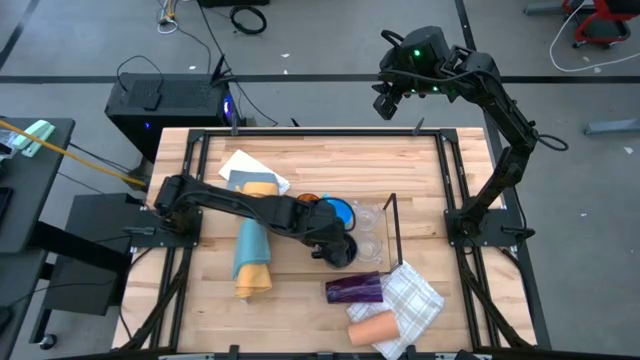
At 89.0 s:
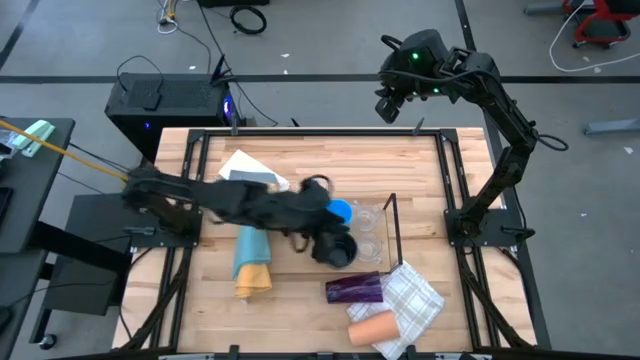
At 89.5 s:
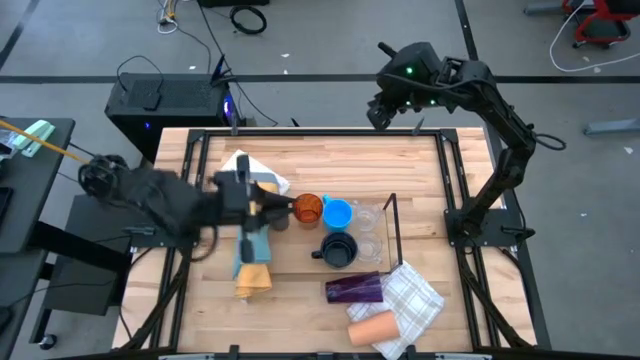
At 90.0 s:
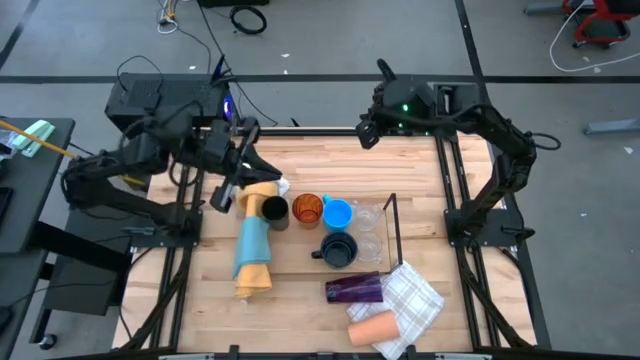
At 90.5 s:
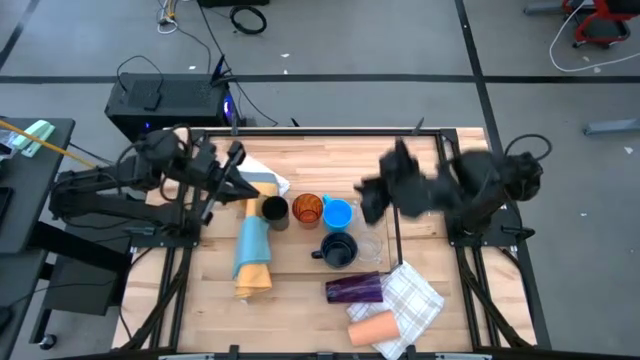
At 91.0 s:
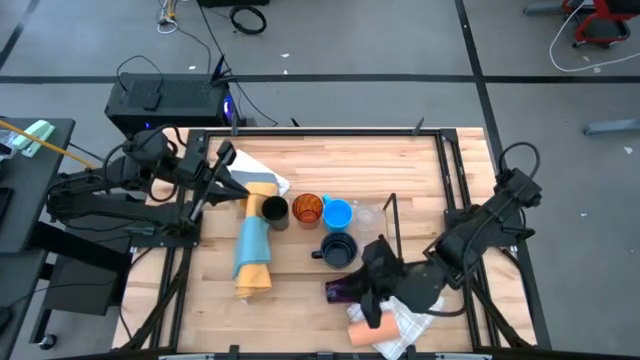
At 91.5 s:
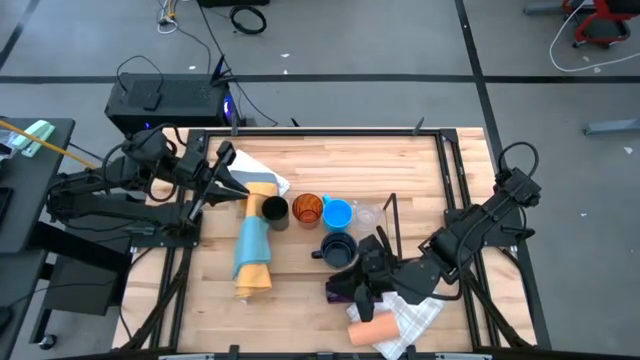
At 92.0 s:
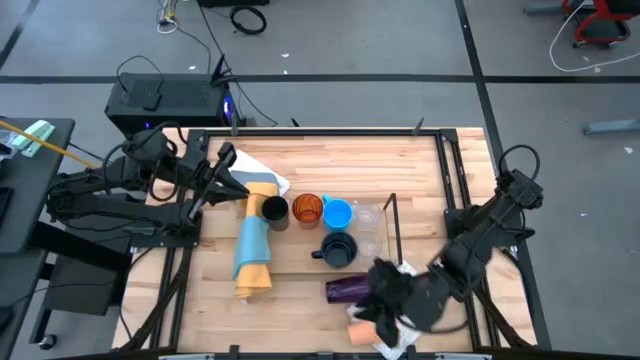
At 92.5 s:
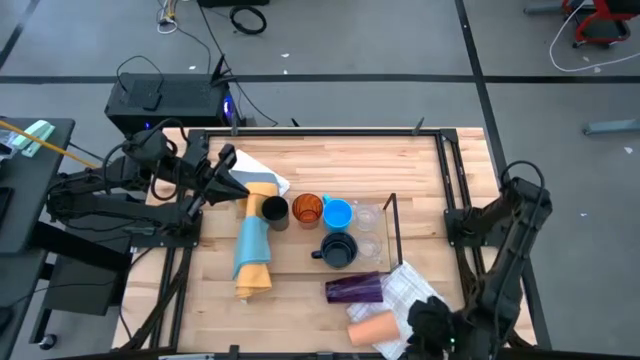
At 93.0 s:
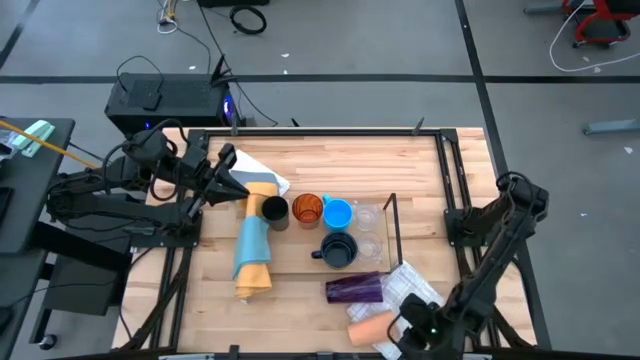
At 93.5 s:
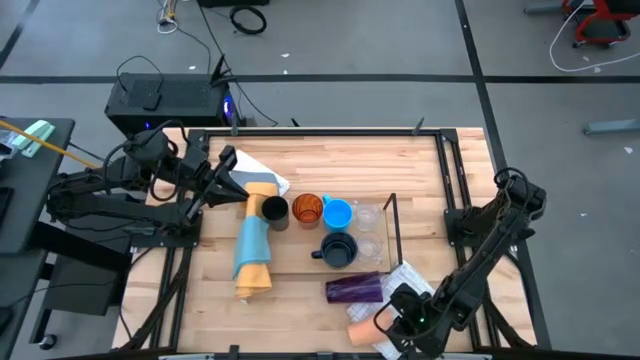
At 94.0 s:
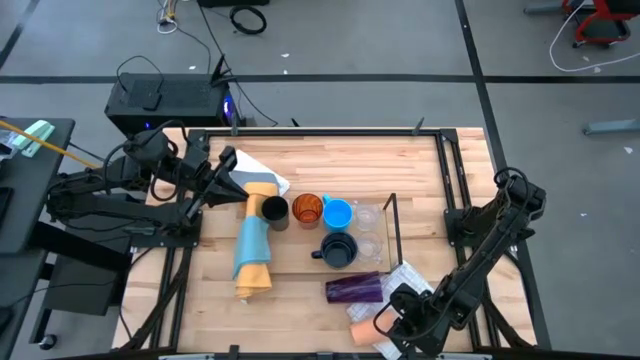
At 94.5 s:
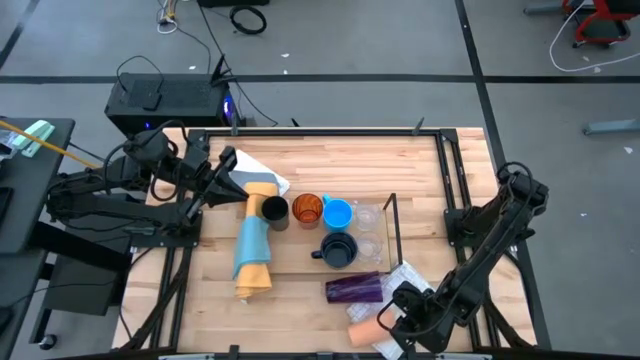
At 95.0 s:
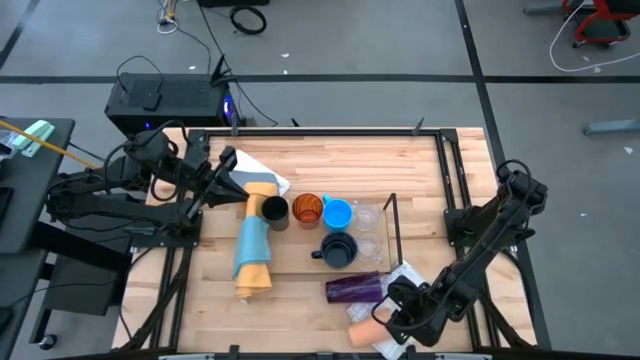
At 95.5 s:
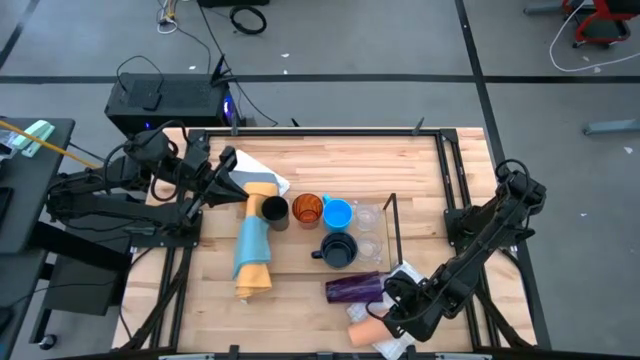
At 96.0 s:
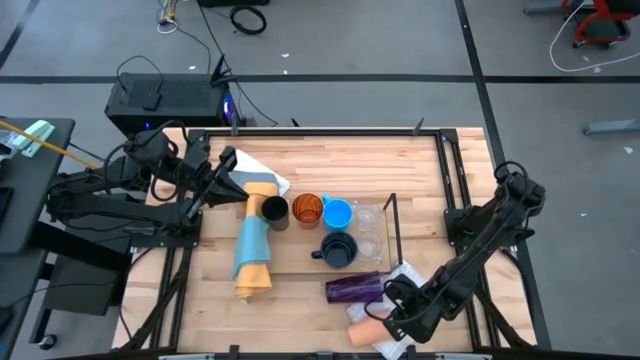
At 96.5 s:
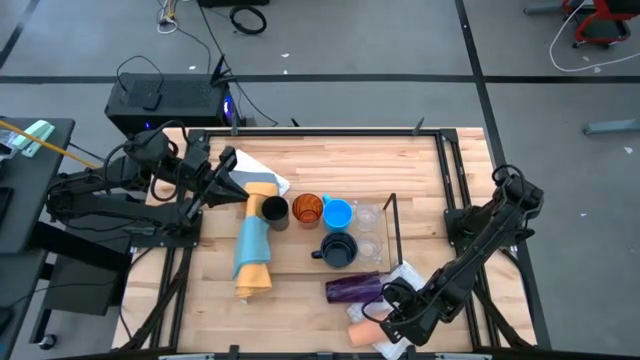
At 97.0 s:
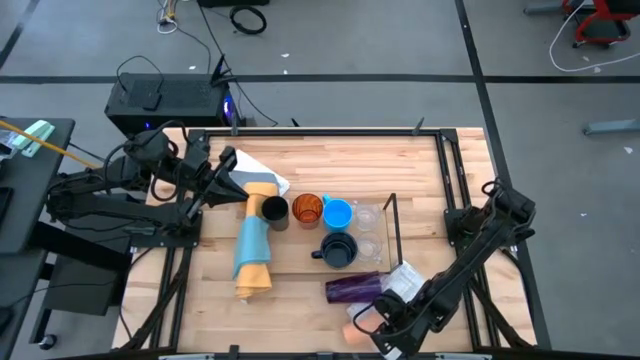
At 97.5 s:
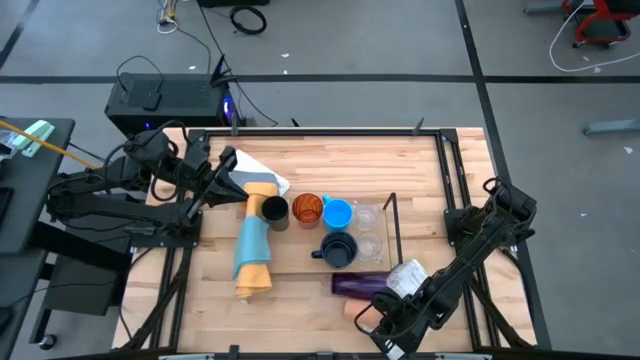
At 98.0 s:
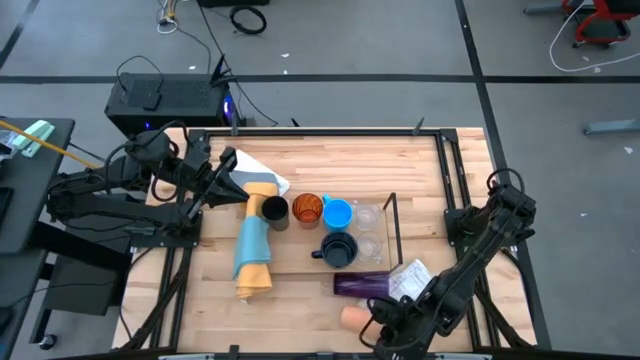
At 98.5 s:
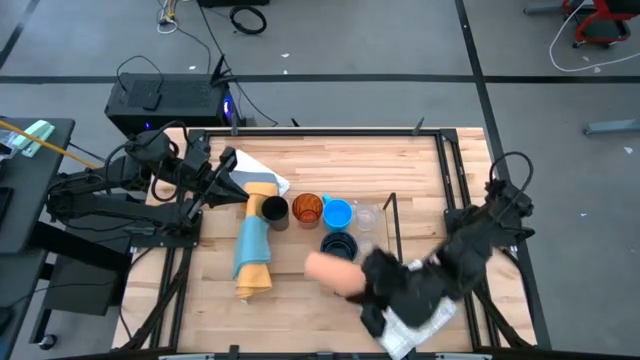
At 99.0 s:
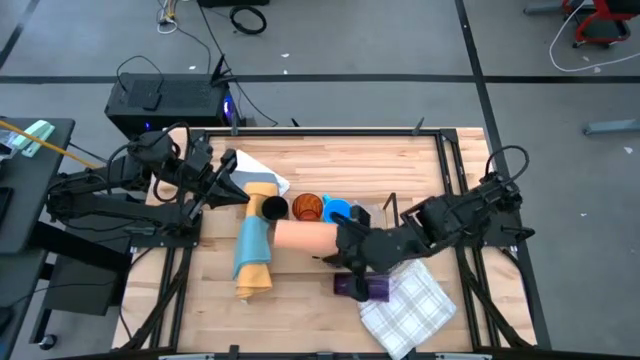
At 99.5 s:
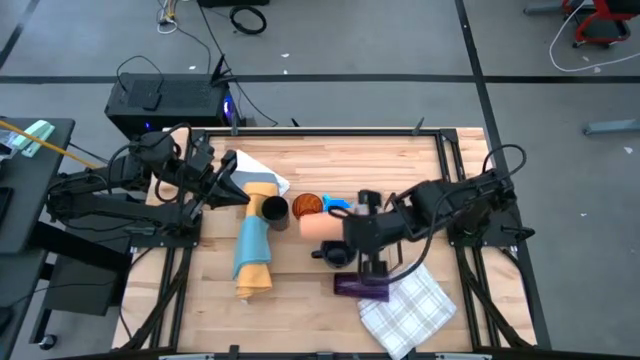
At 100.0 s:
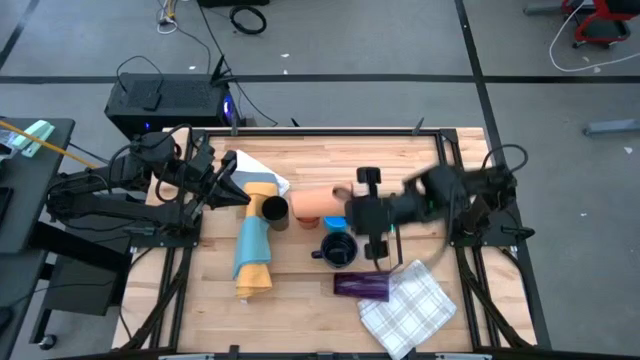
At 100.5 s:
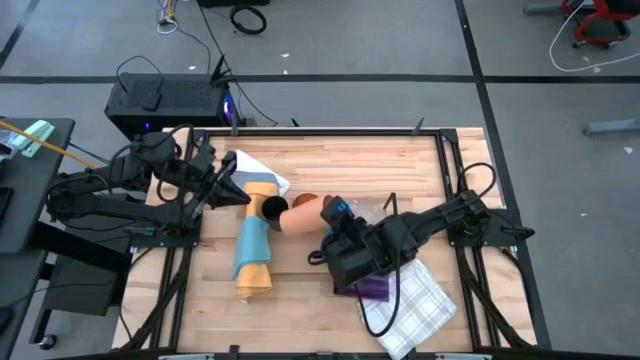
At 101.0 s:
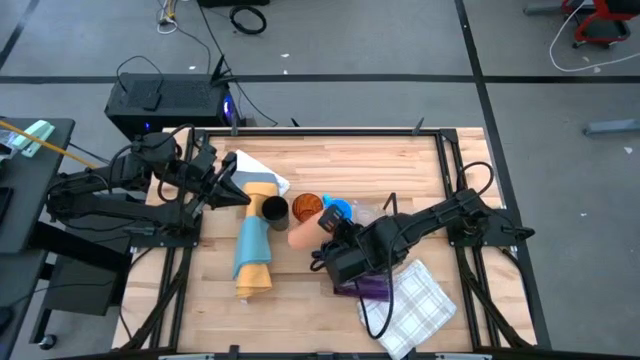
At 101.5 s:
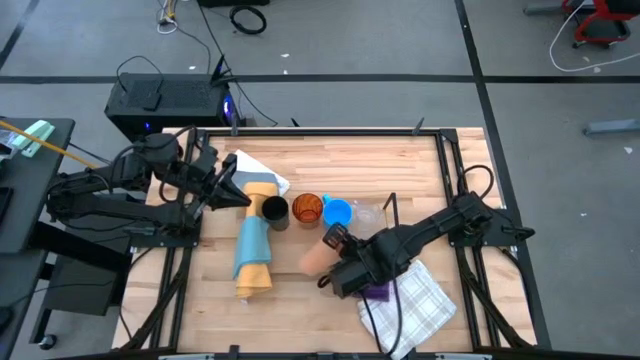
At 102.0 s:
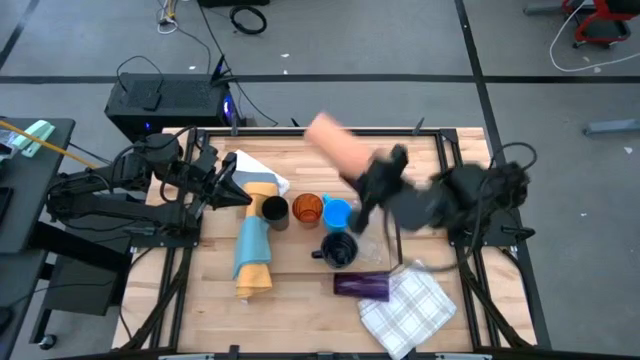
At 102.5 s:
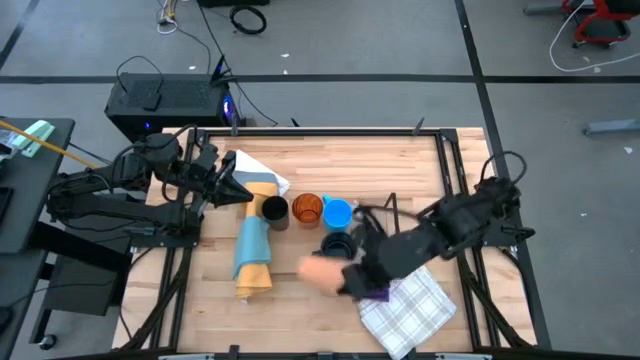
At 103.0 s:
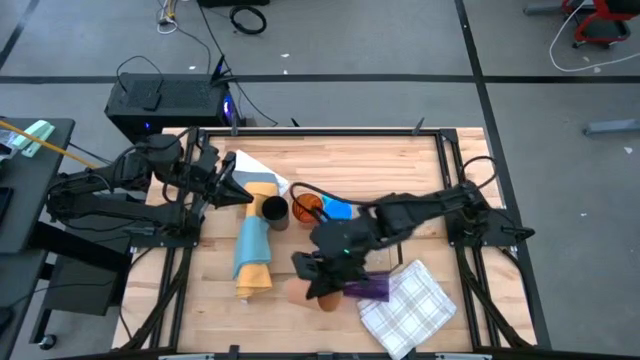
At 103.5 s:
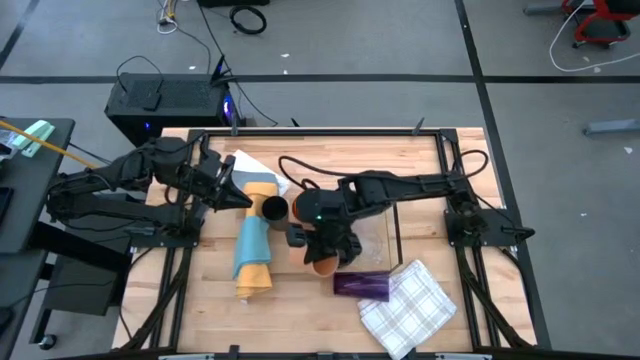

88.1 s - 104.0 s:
Task: Stack small to large cups/mugs on shelf
Put the light orange cup on the shelf

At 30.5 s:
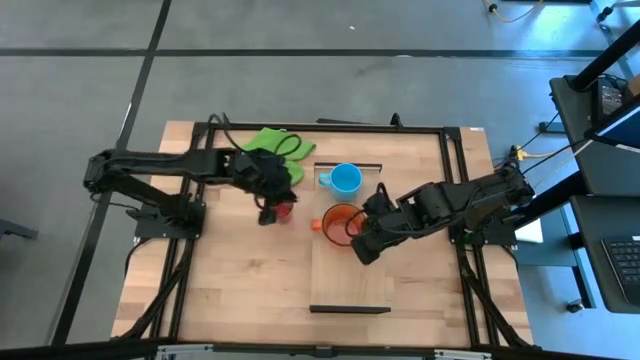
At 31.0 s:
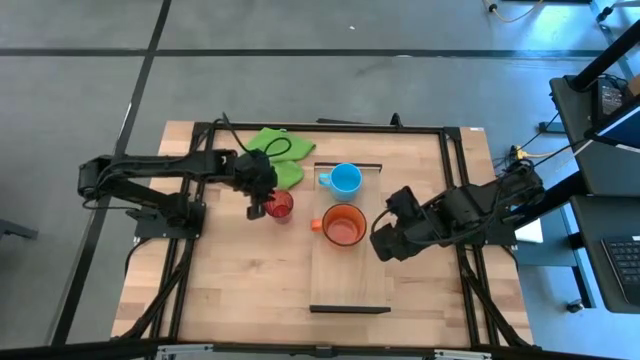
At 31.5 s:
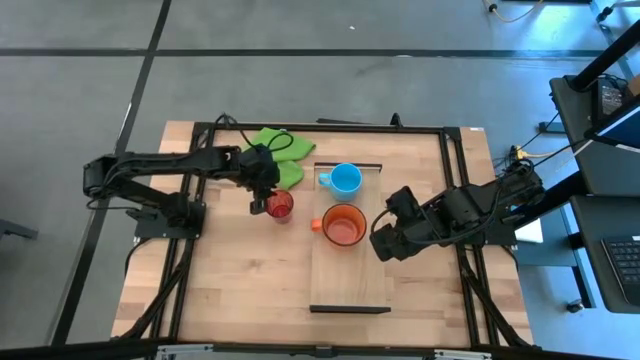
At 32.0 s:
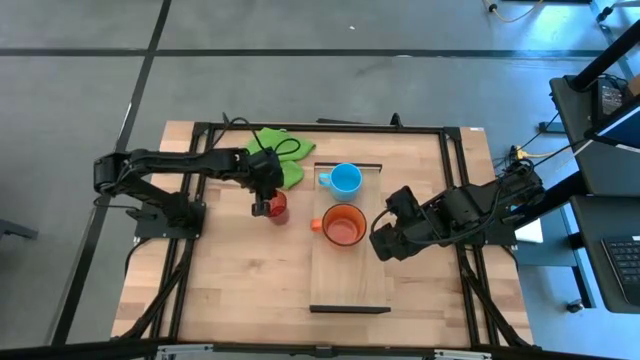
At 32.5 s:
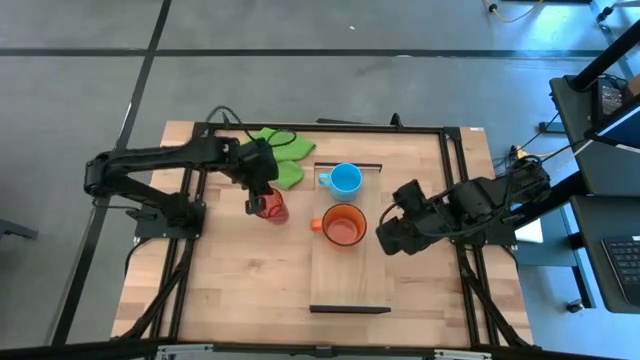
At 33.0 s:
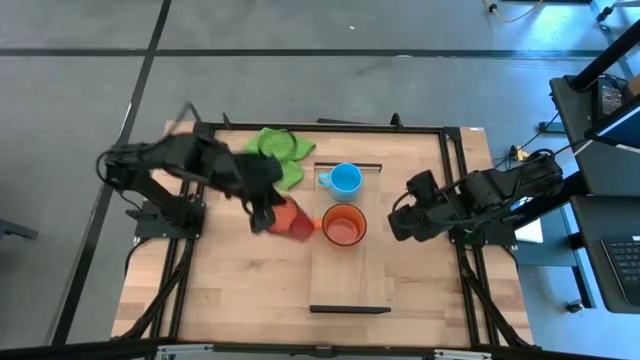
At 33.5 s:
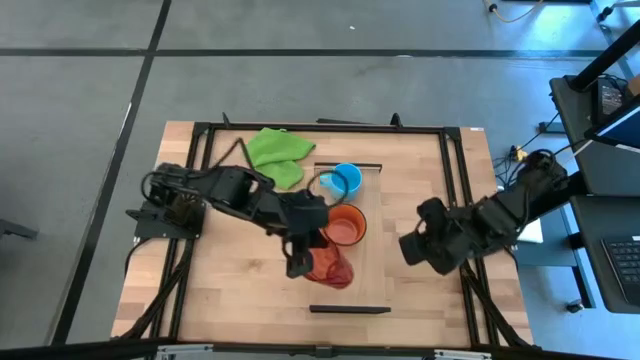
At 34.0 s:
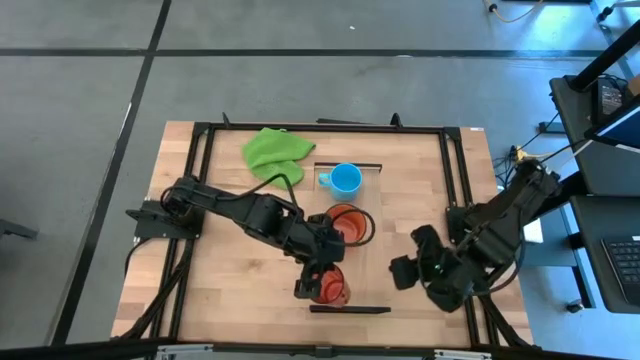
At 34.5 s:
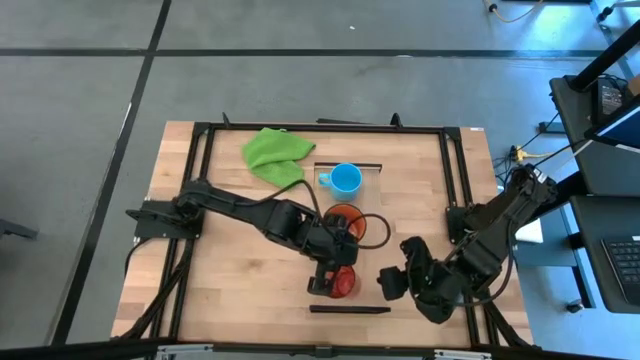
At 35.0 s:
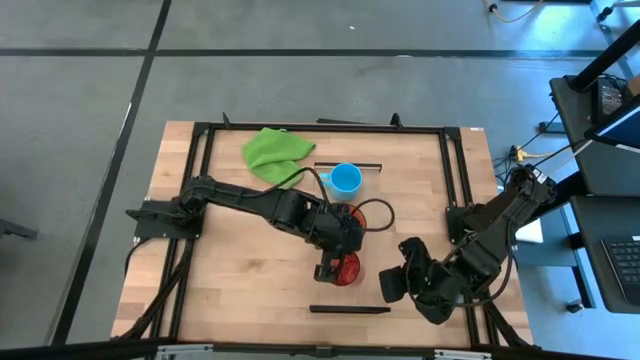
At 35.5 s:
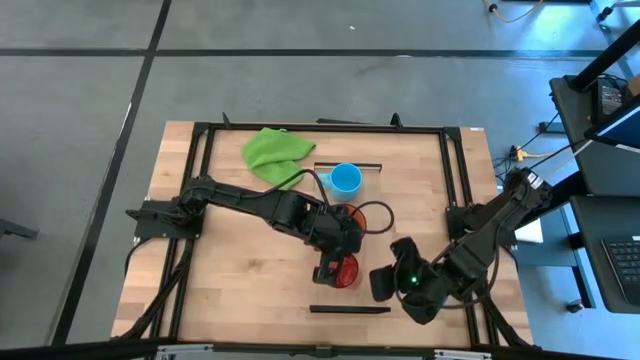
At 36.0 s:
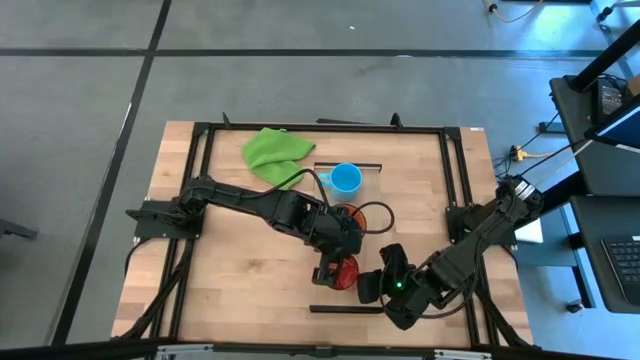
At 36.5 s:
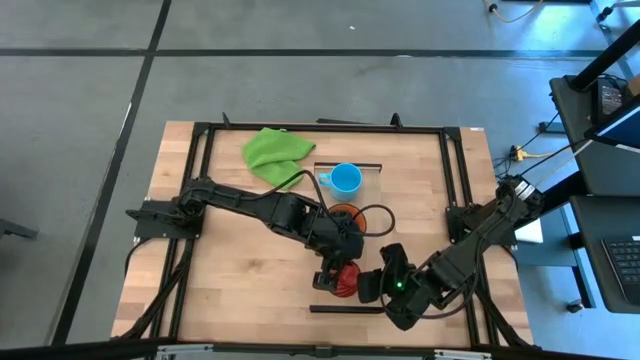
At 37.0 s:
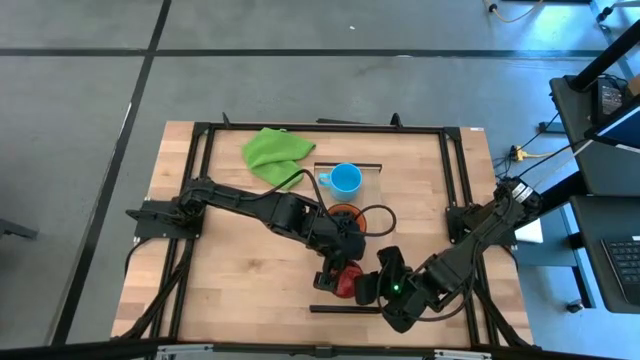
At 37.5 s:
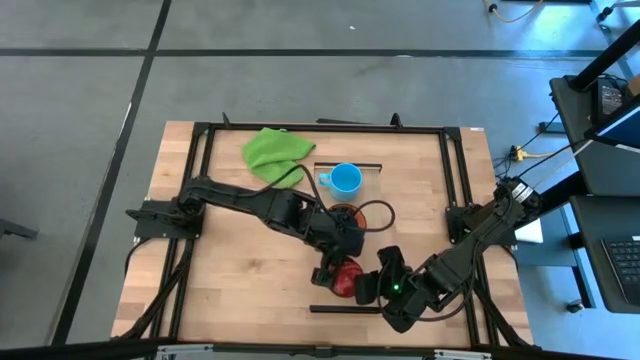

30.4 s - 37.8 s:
Task: Stack small to large cups/mugs on shelf
Put the orange cup on the shelf
